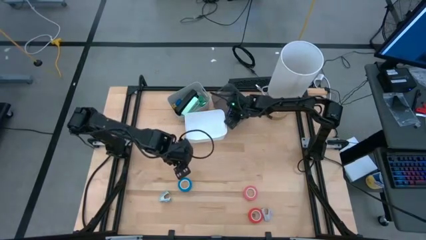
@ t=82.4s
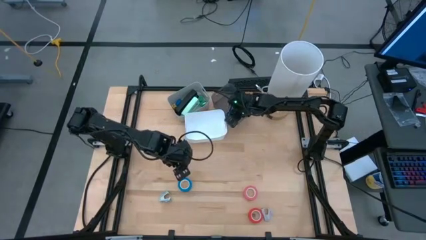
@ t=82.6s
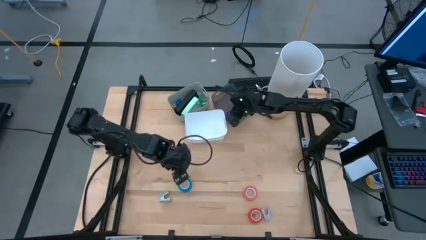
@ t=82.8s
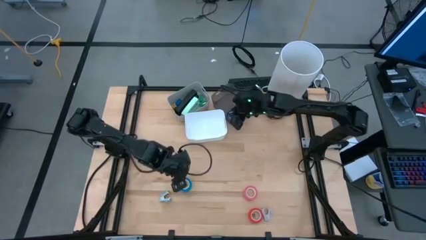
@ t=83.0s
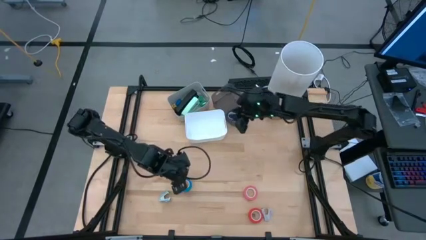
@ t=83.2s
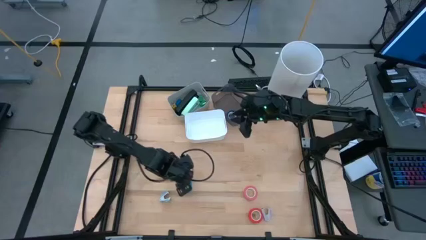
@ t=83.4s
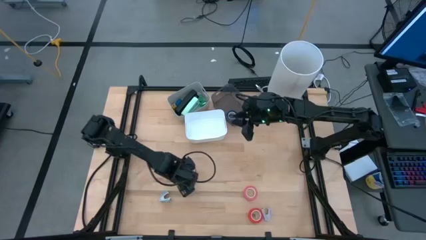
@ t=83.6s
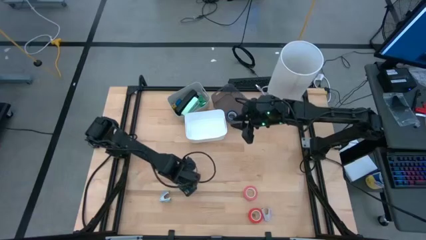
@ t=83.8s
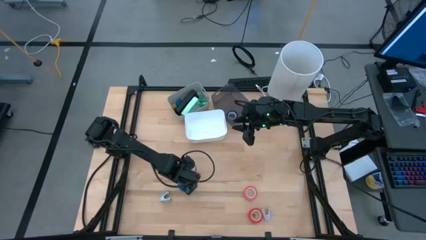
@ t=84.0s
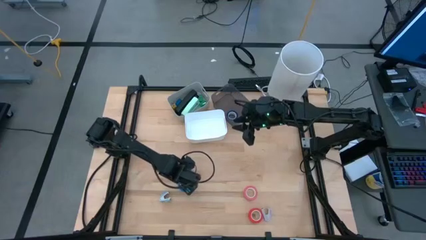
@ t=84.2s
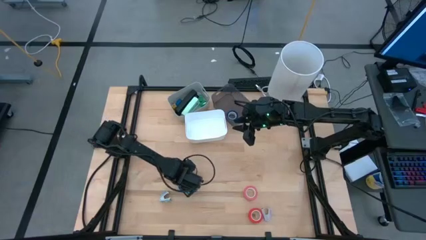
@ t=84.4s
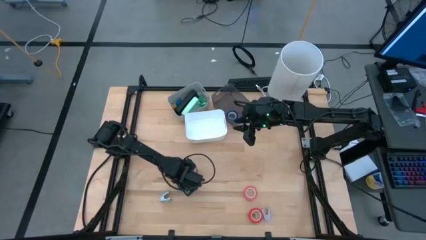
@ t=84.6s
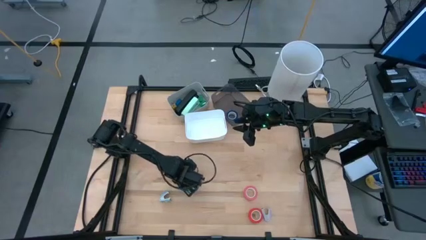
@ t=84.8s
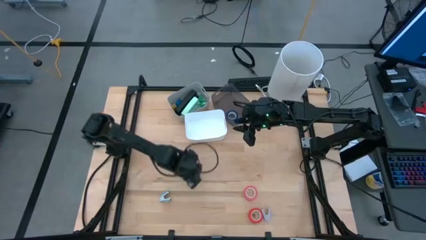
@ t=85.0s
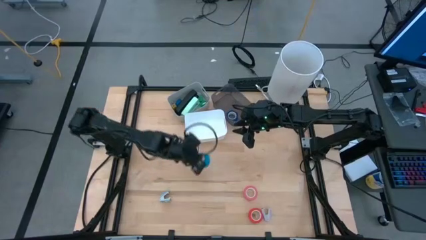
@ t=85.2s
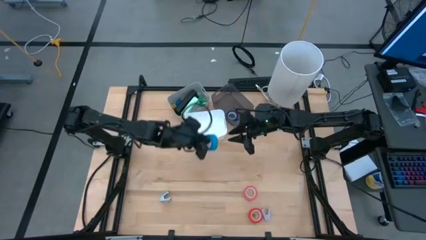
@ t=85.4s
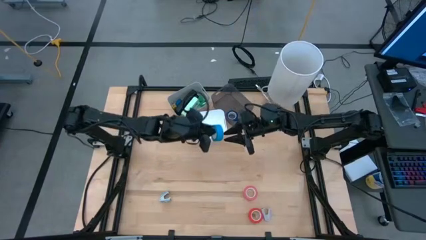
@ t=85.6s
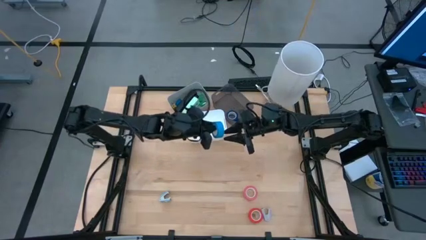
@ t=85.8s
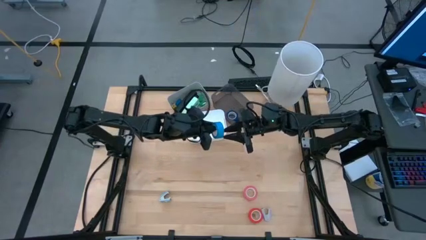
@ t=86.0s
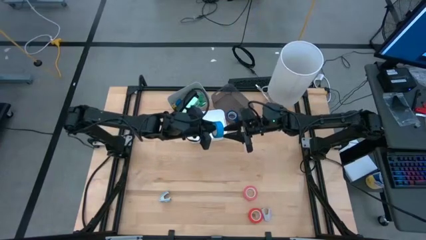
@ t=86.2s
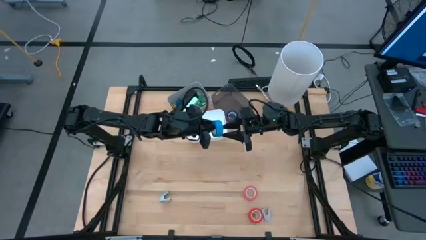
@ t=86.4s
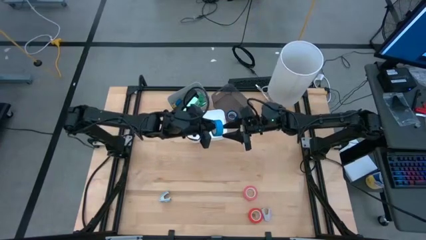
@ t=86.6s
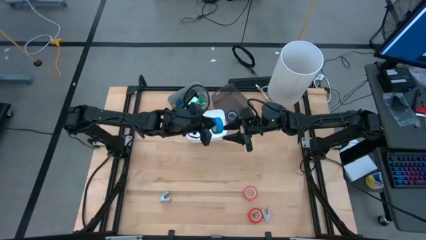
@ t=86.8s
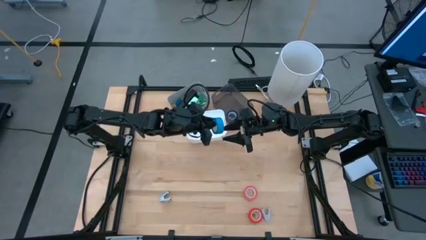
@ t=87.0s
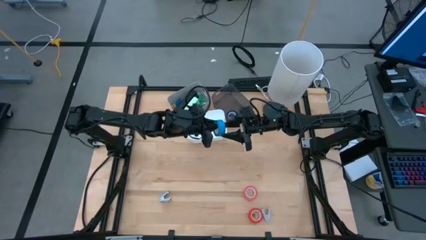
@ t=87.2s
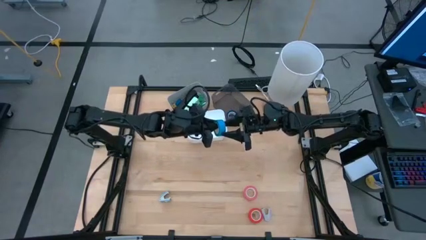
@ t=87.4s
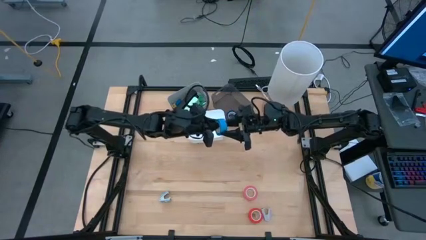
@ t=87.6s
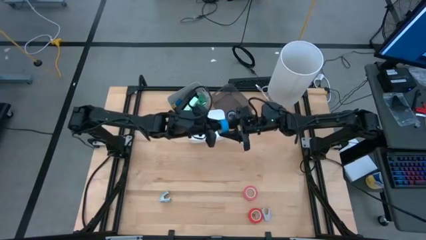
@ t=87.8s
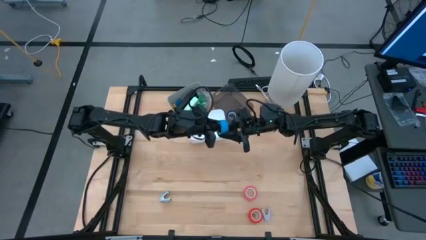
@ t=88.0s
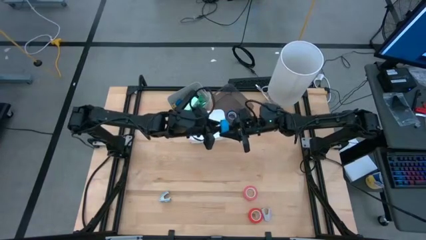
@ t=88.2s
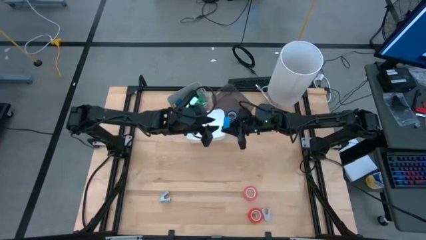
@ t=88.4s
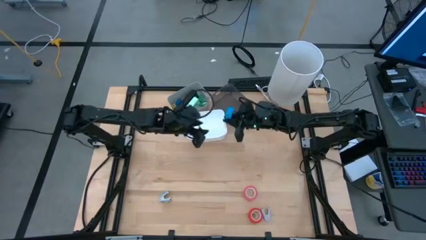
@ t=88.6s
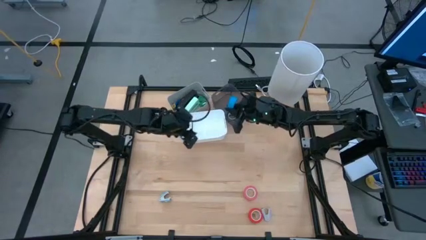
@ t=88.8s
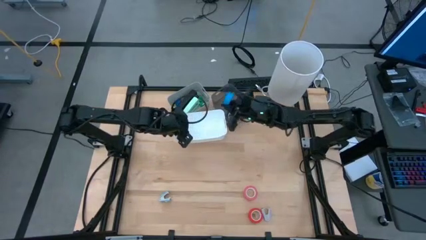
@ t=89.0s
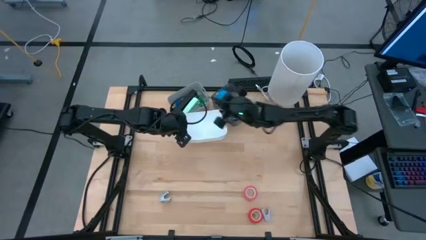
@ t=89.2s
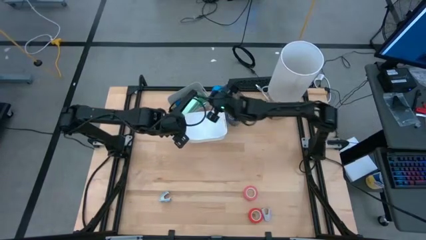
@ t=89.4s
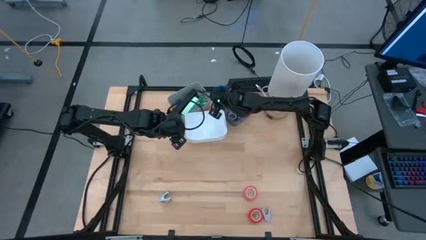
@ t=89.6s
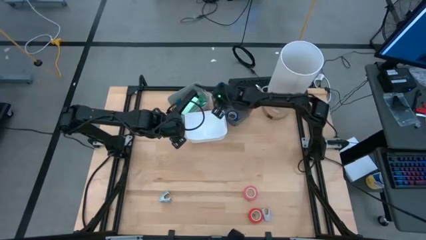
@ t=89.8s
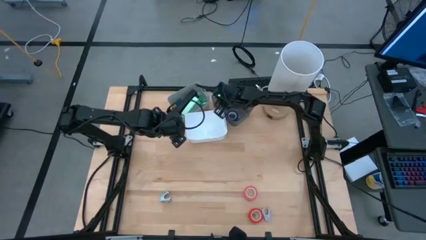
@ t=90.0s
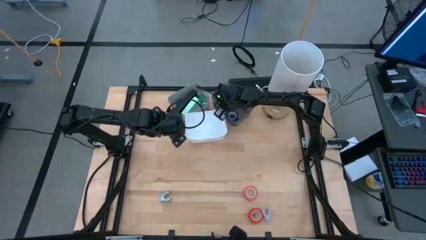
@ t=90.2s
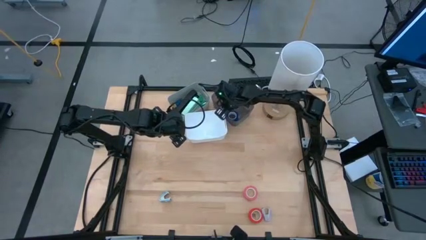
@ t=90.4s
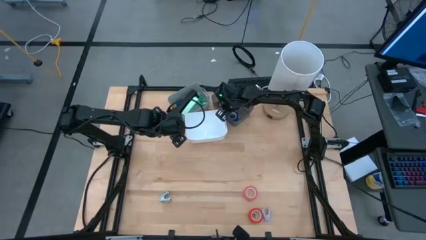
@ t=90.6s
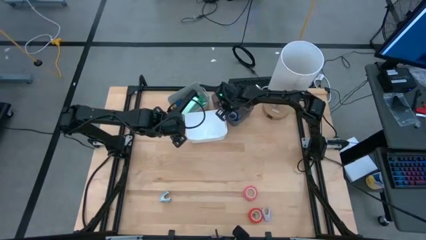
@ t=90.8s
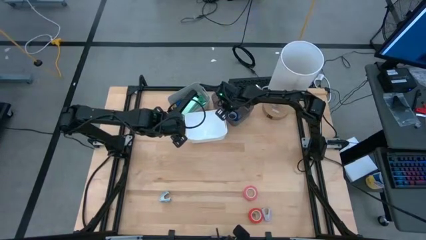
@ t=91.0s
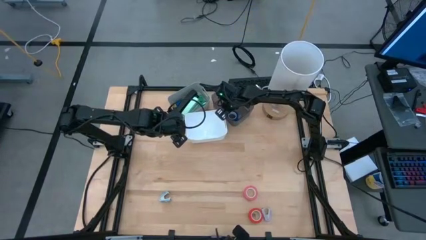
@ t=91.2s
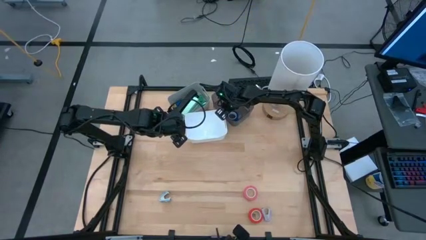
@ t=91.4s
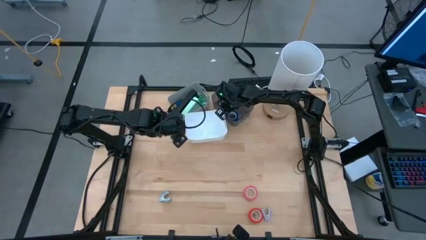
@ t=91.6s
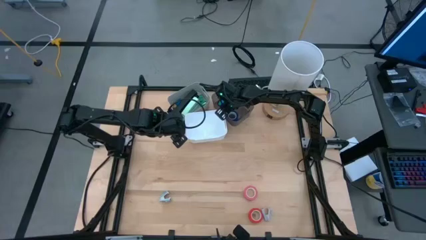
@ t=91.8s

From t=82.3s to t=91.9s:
Task: Pick and place Stapler, Stapler remover, tape
Put the blue tape into the black bin

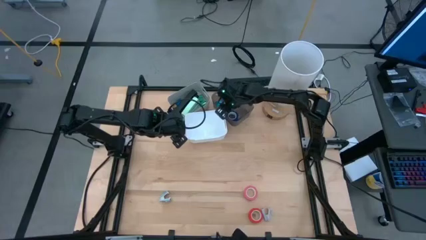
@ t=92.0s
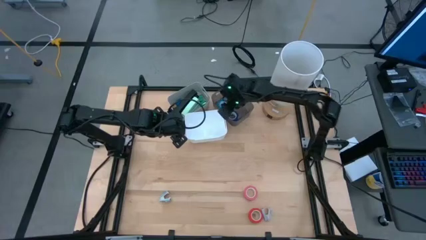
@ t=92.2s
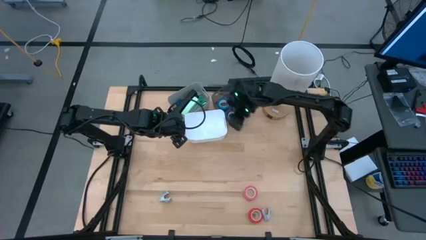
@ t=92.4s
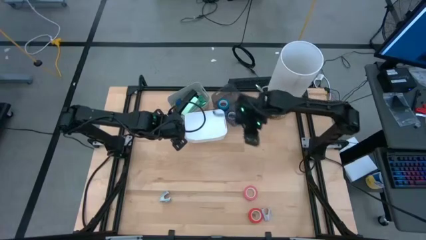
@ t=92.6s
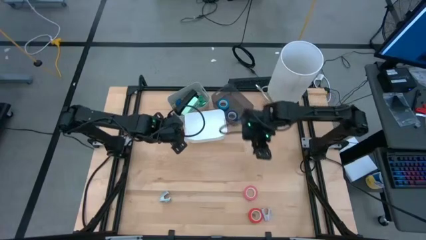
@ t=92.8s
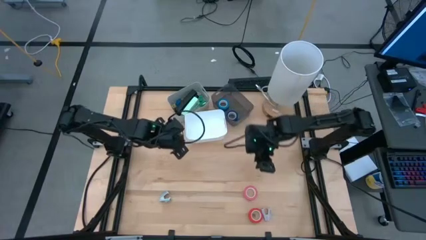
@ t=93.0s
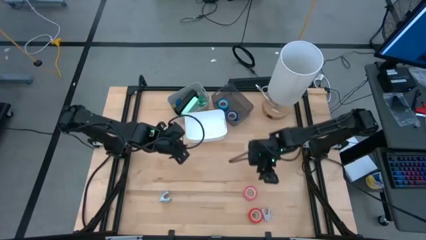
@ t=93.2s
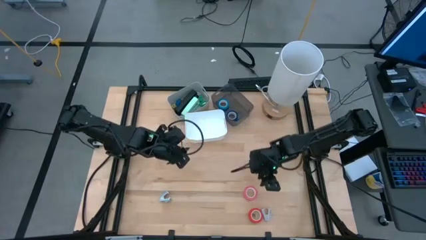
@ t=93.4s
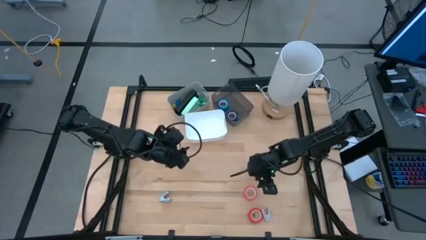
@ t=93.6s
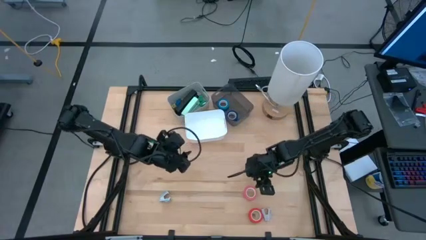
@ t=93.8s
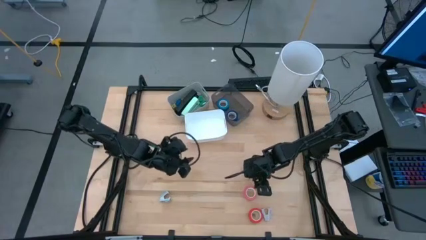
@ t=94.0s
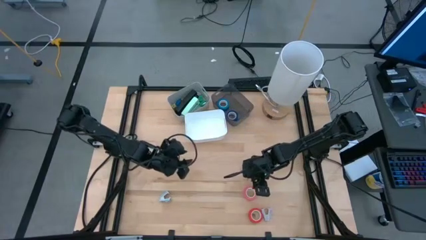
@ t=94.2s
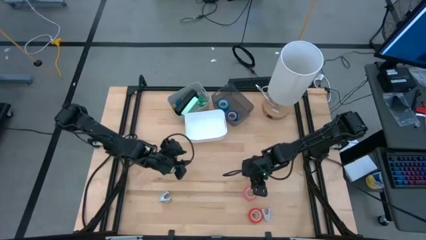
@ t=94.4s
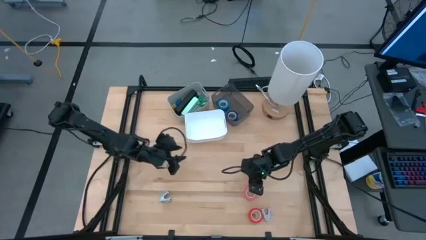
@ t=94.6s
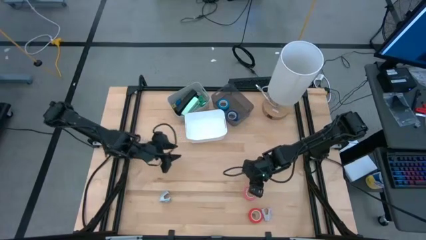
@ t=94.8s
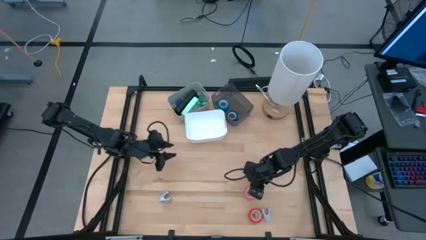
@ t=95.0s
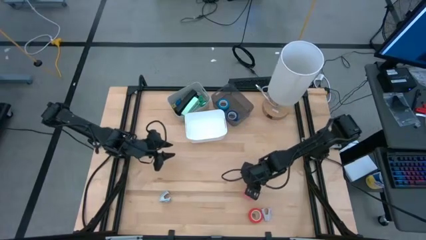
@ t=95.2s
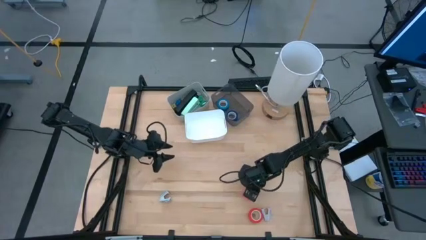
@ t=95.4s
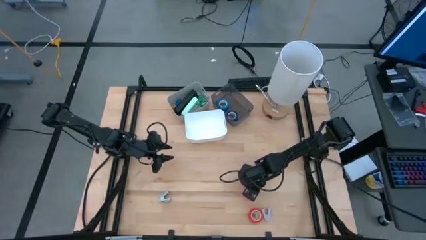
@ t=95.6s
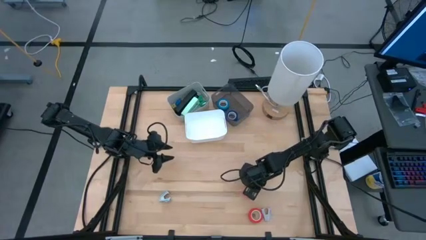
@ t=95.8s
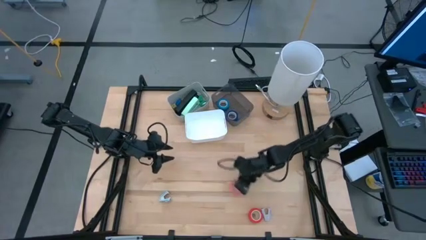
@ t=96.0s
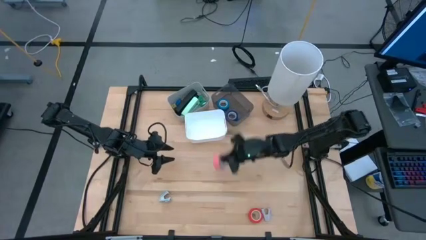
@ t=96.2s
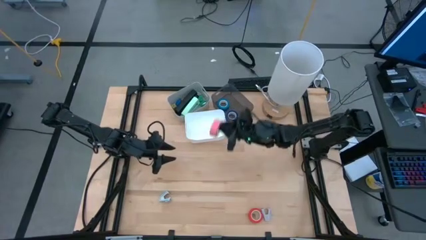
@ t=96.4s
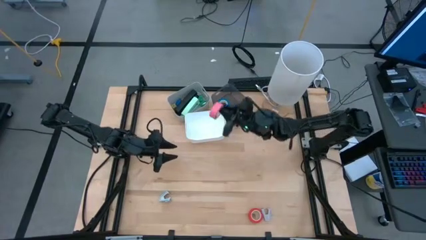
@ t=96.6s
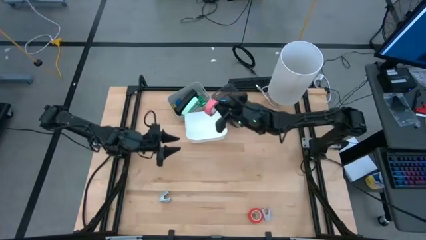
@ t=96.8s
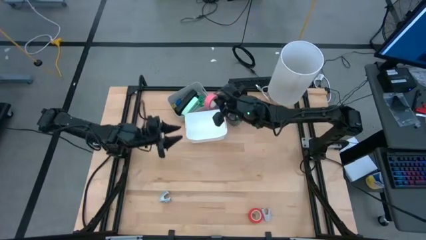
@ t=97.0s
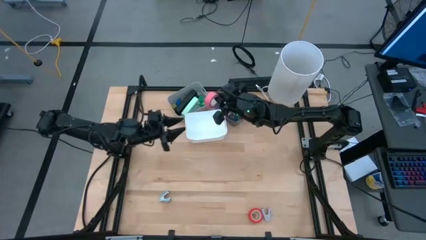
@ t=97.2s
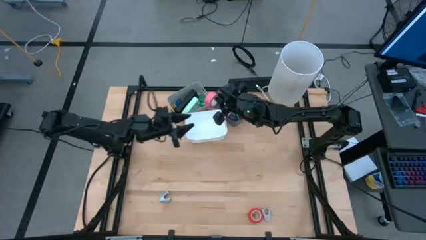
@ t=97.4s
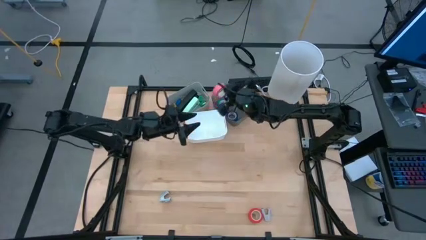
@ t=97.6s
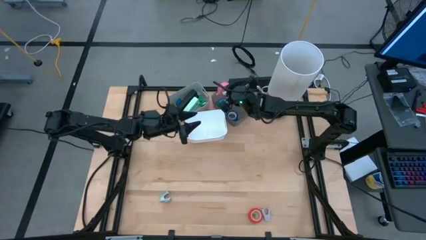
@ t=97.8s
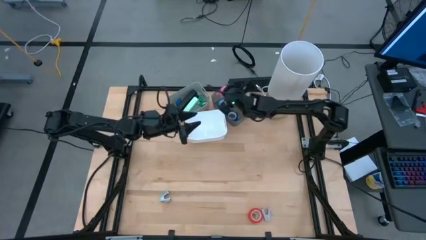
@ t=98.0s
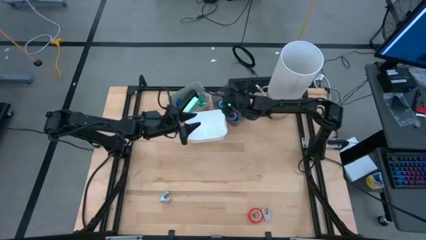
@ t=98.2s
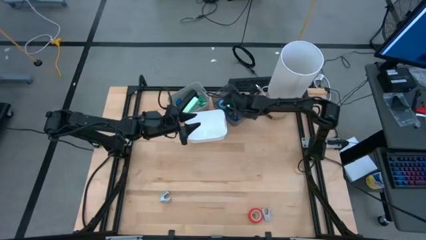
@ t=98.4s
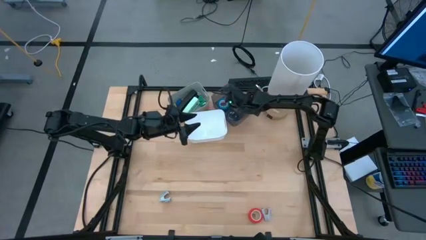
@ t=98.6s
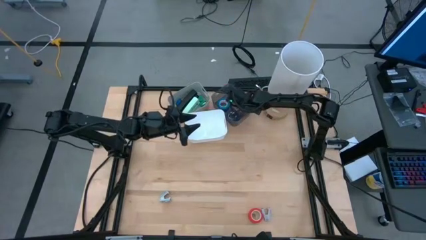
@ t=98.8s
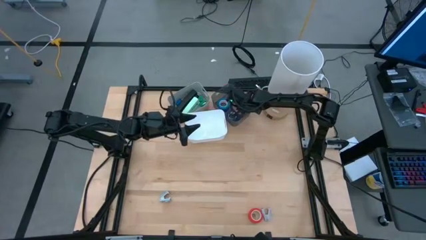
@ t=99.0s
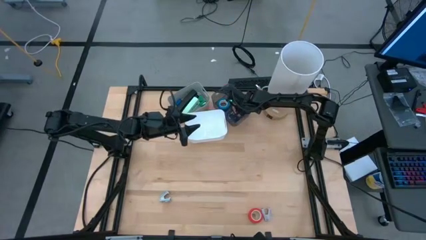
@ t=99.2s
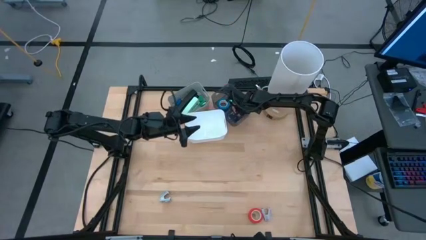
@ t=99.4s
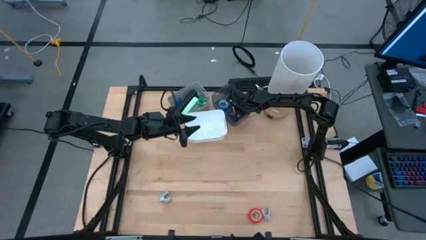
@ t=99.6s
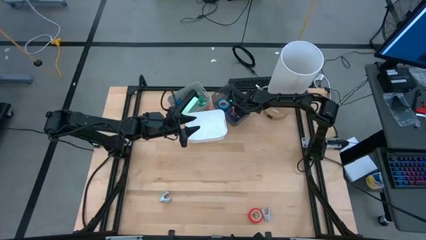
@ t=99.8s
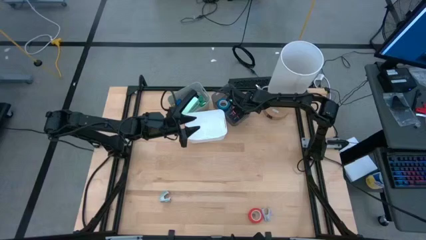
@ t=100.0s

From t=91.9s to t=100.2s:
Put the pink tape into the black bin
